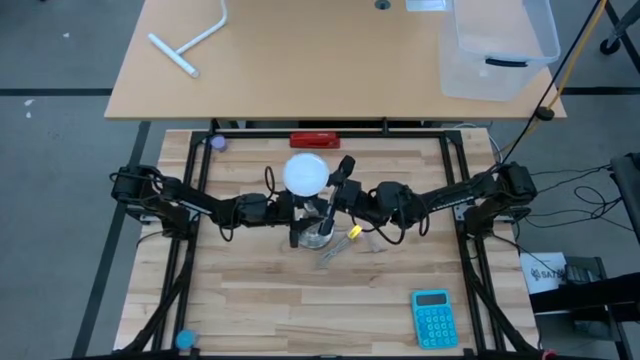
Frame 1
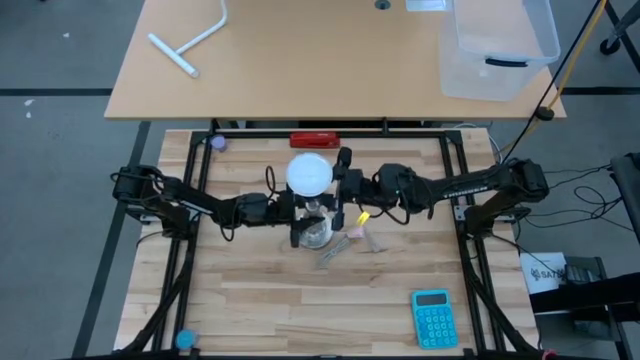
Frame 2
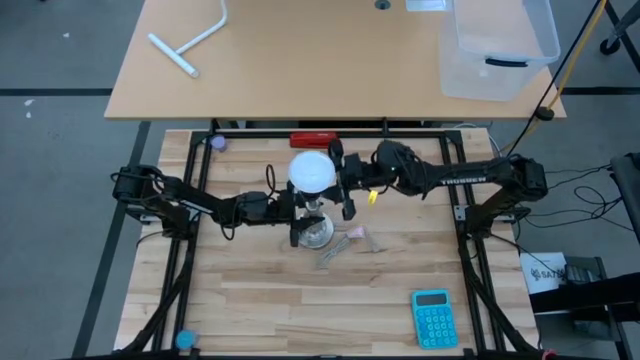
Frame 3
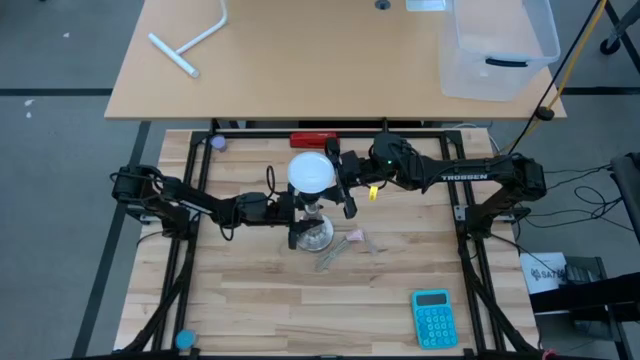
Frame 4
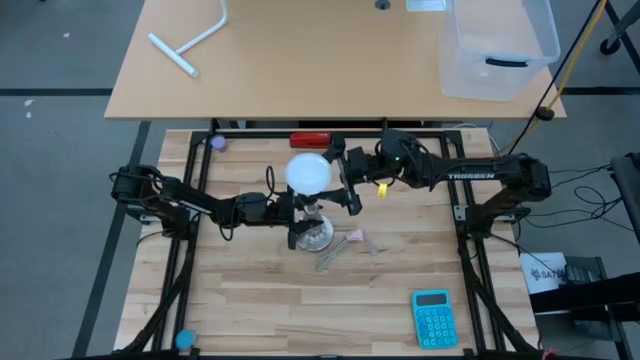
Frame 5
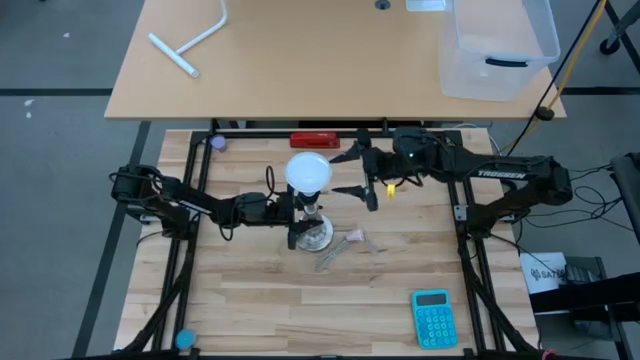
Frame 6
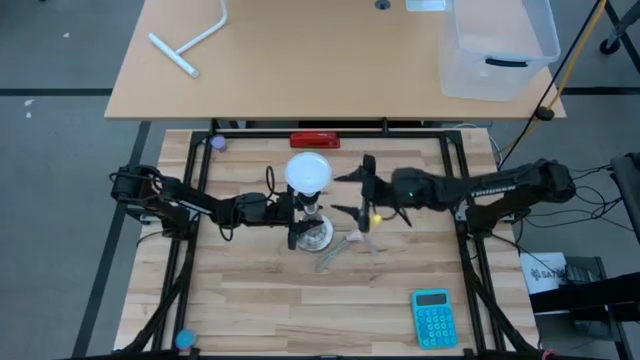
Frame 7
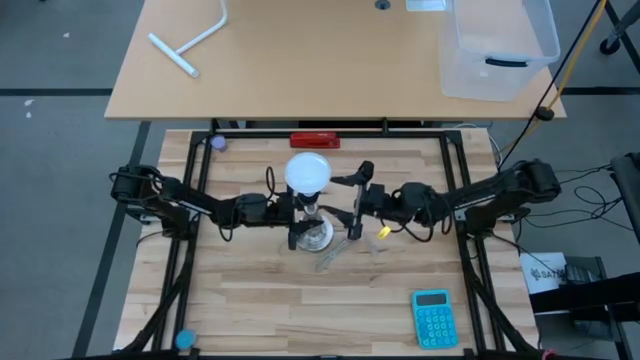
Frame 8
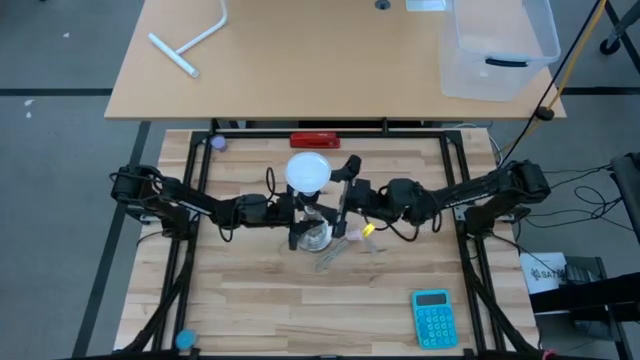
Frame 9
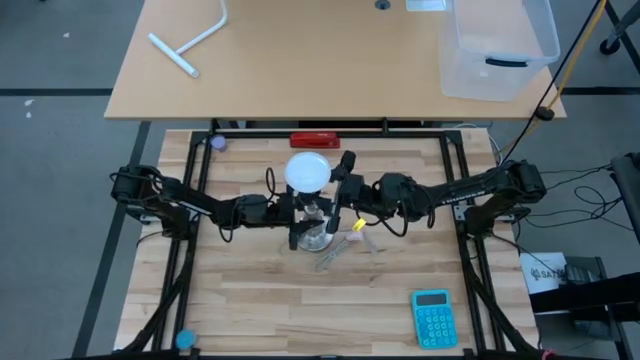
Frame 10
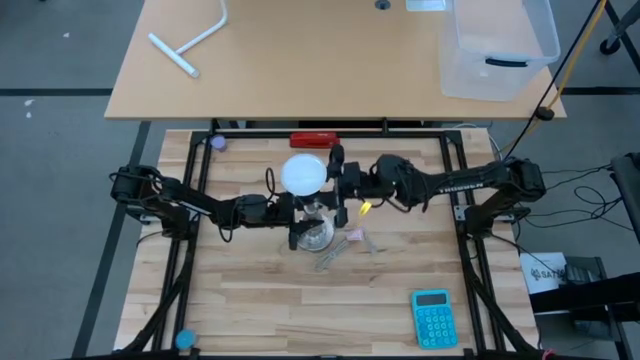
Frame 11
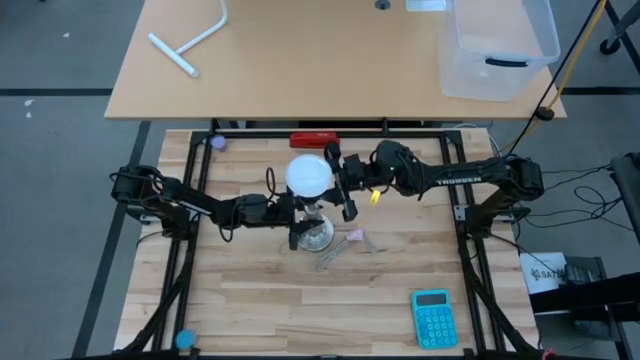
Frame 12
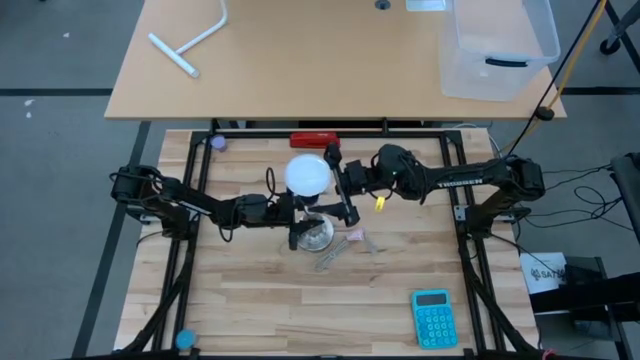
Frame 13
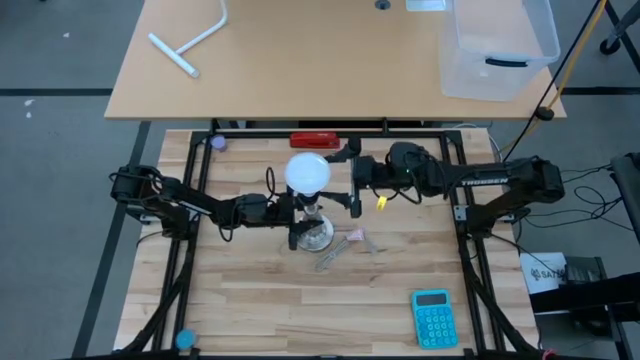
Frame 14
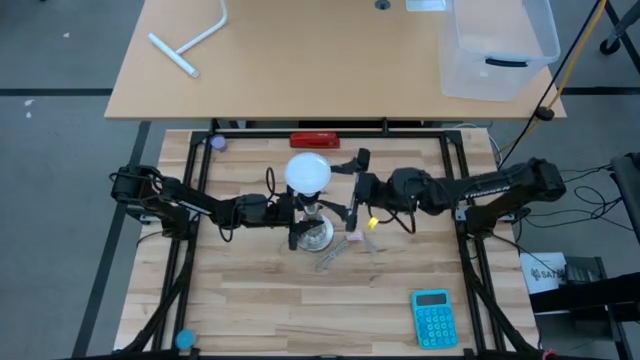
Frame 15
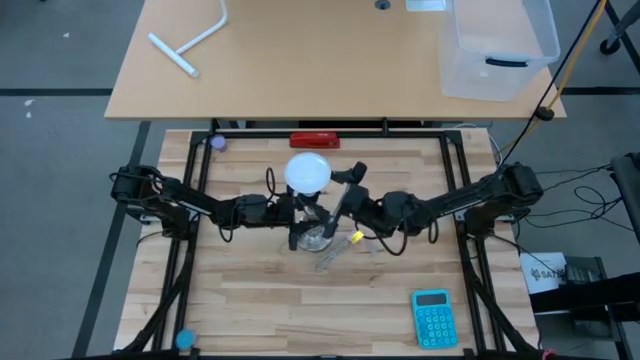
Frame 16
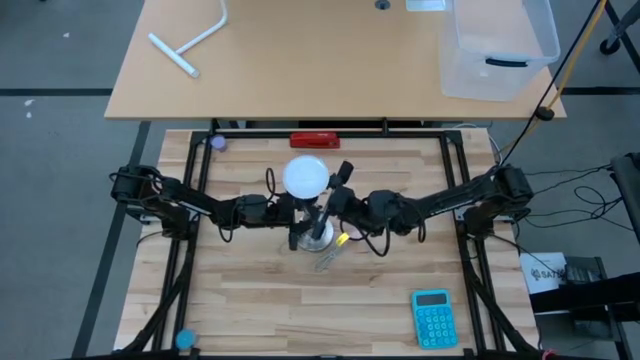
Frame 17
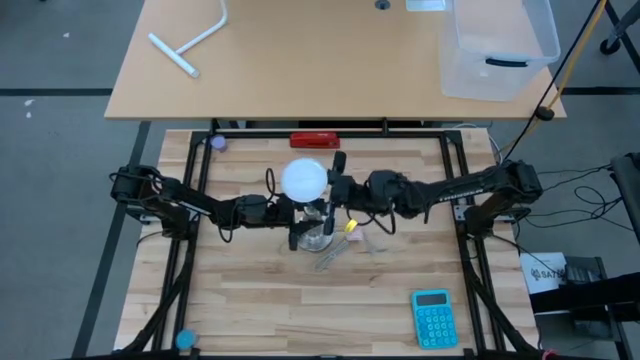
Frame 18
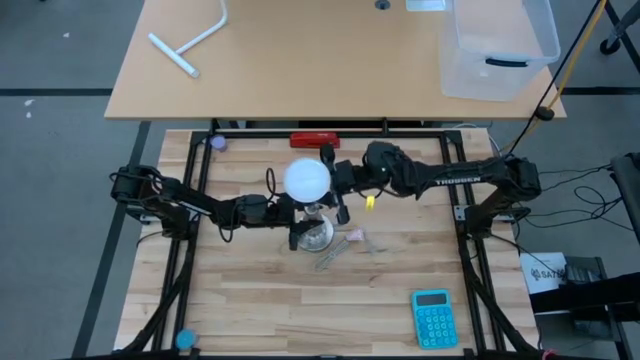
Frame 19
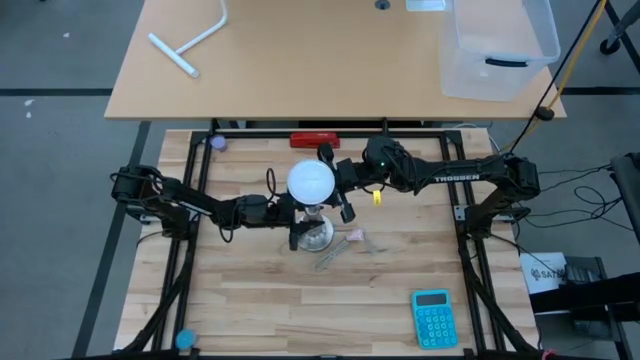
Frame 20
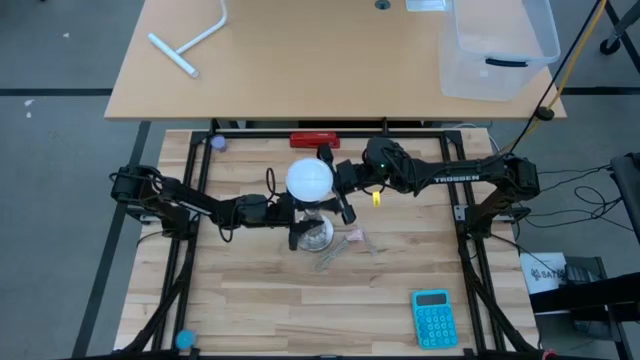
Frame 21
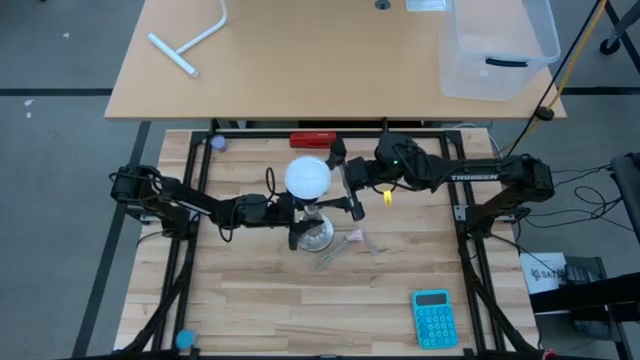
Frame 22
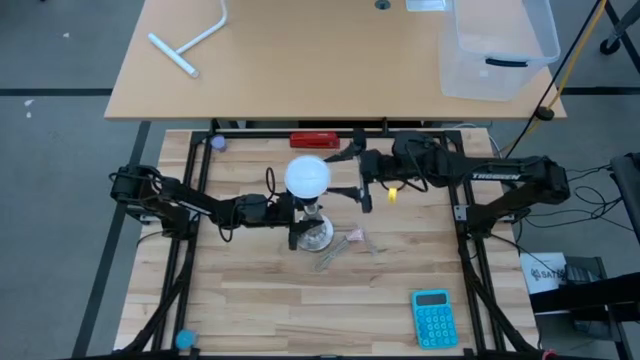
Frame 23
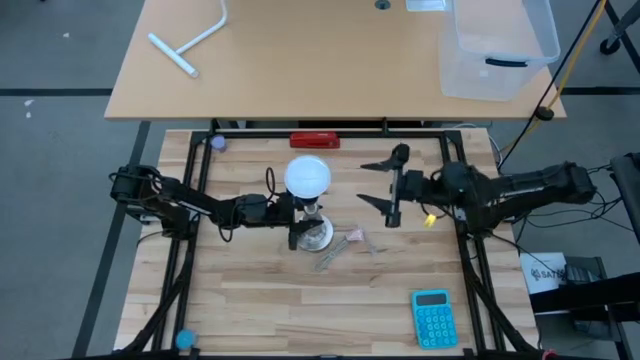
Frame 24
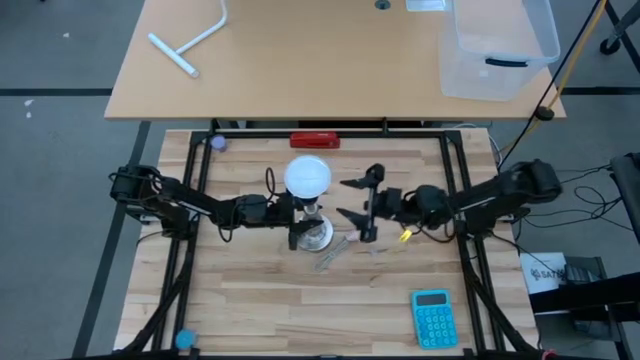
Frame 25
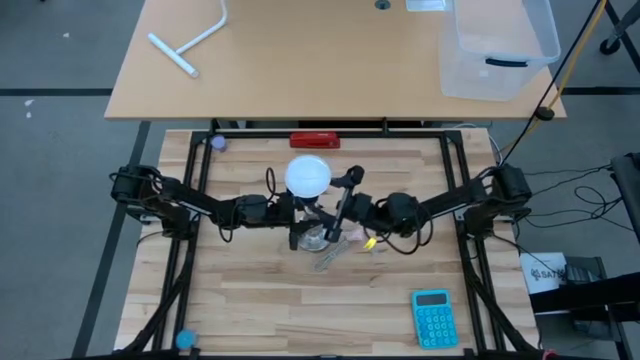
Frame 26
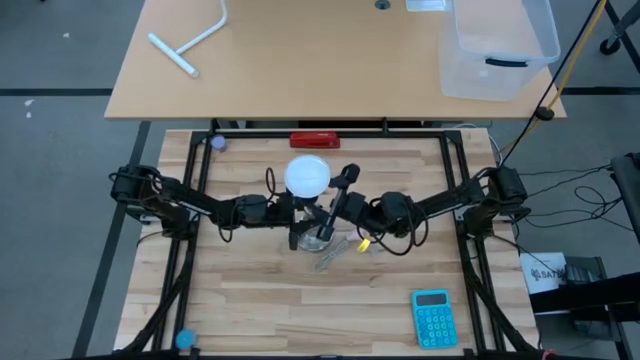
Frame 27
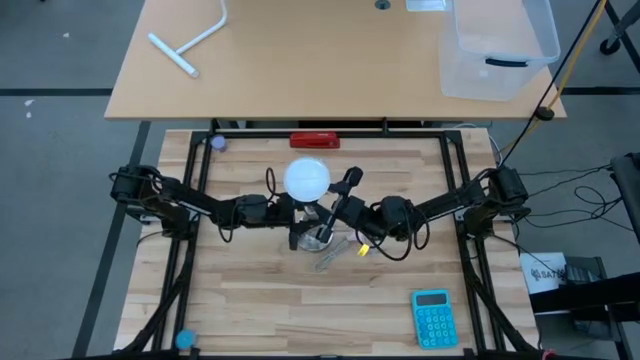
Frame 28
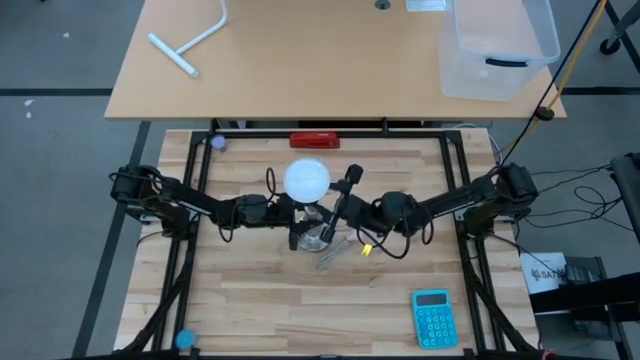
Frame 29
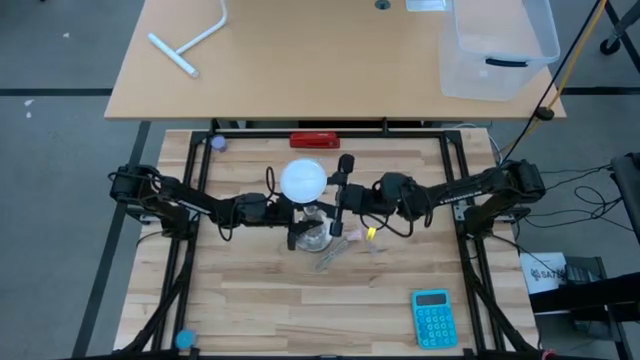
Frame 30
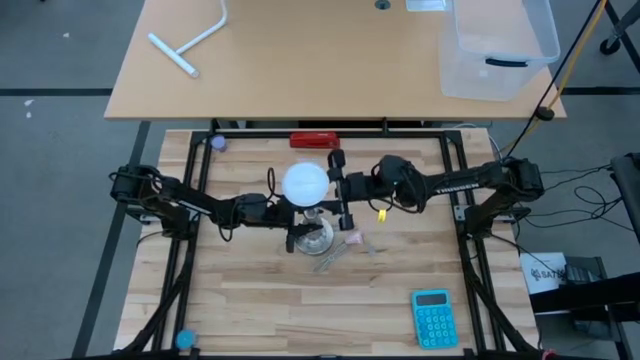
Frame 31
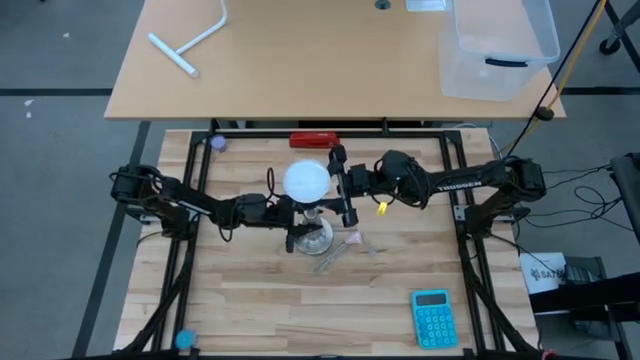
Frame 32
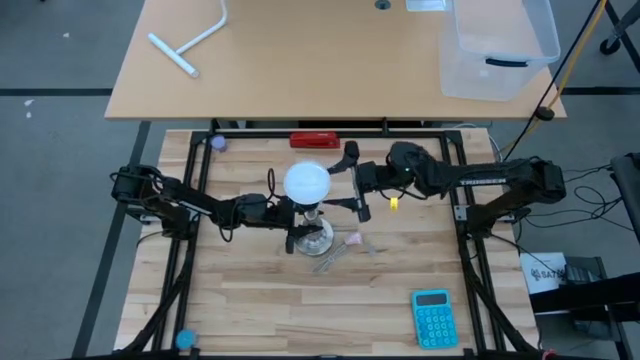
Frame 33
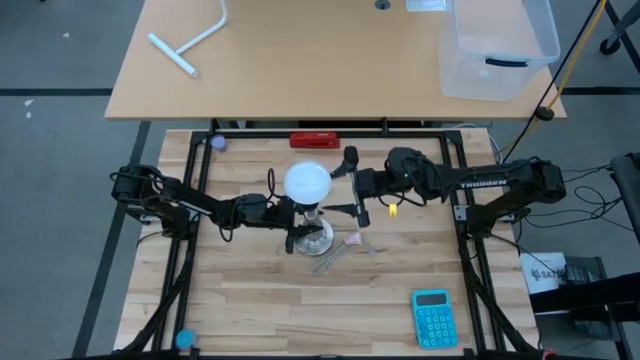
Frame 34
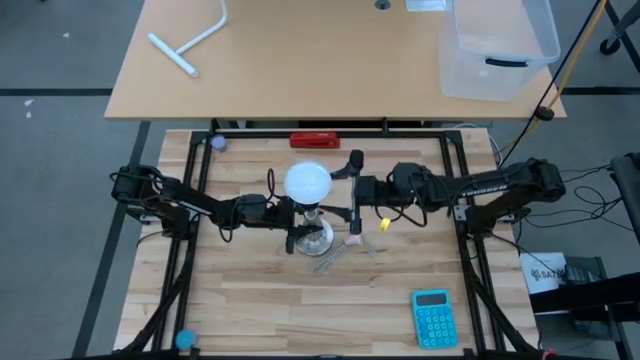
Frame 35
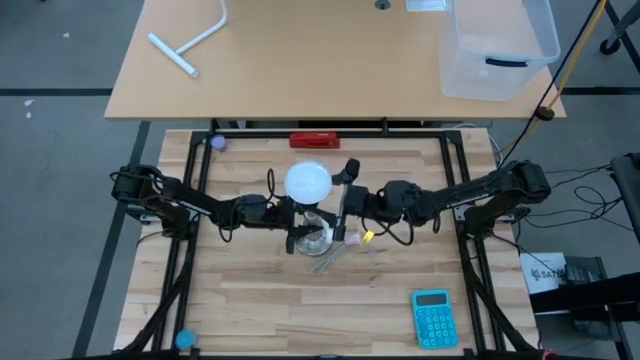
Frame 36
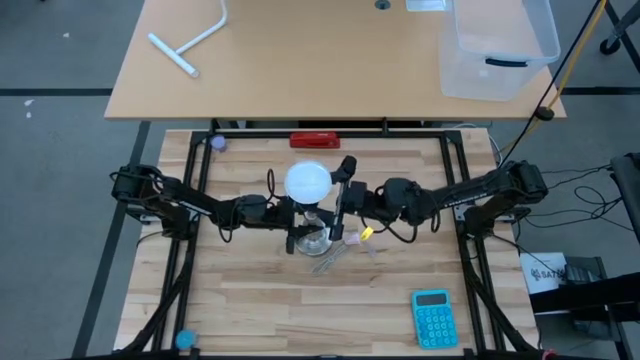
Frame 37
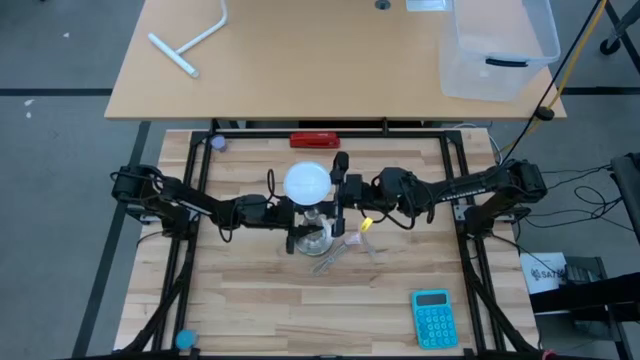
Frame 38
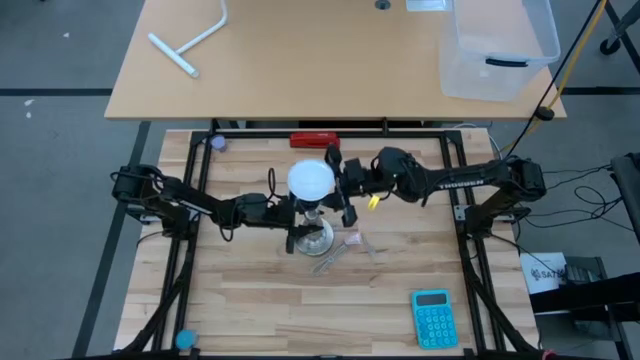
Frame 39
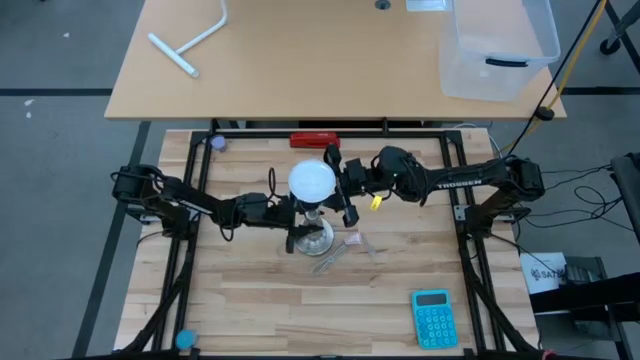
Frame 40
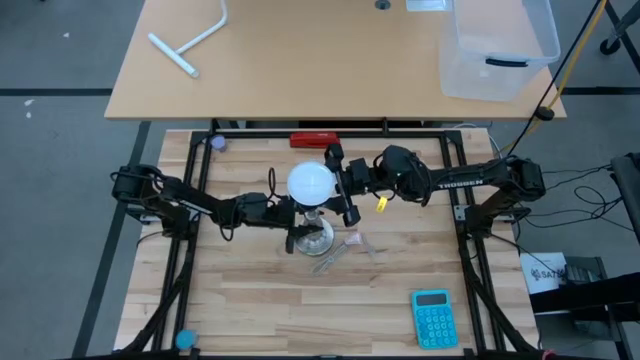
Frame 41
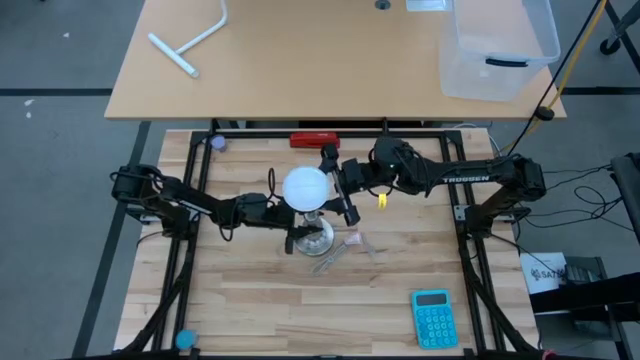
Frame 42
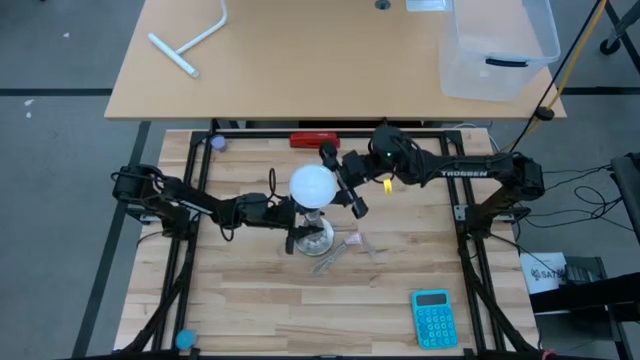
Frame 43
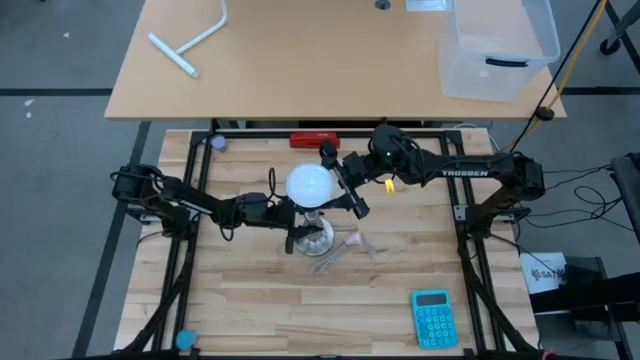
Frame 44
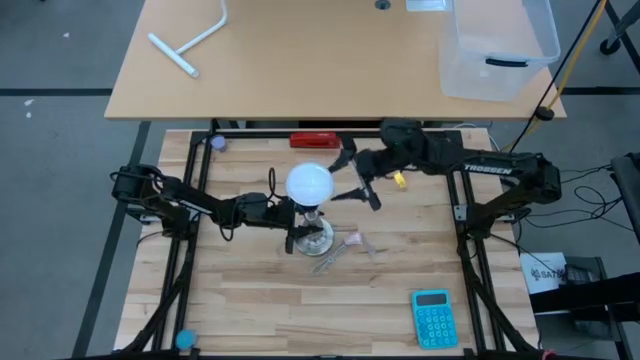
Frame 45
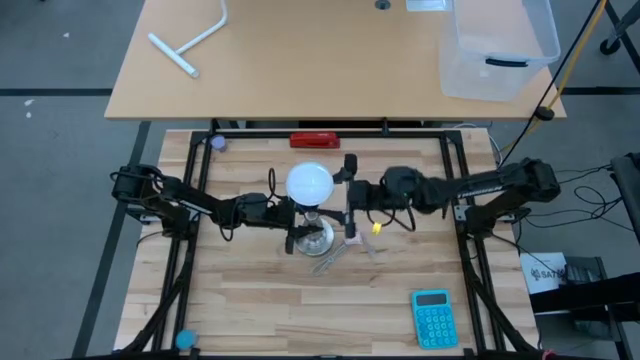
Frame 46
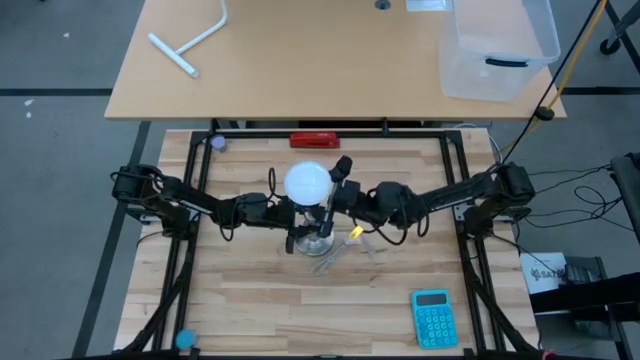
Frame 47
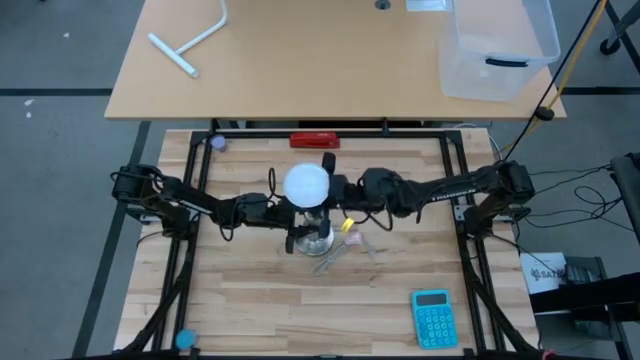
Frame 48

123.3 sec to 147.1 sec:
Task: Screw lightbulb
Remove the white lightbulb from the silver lamp
